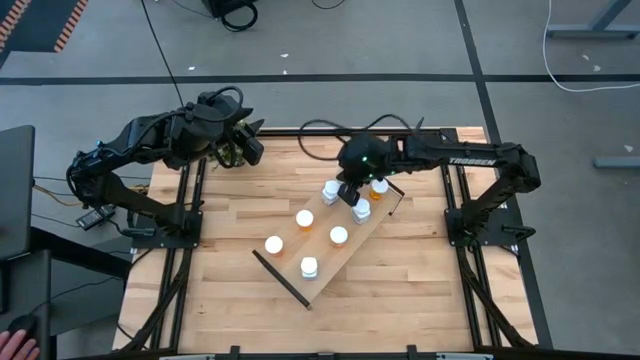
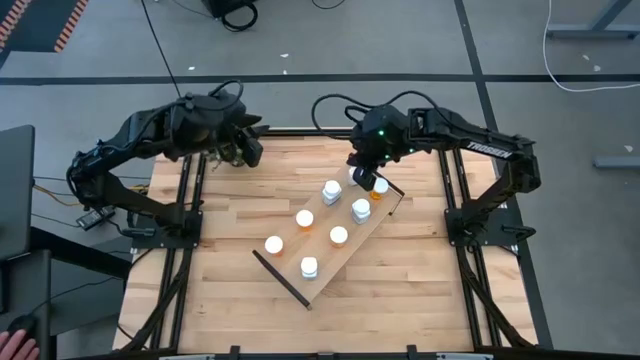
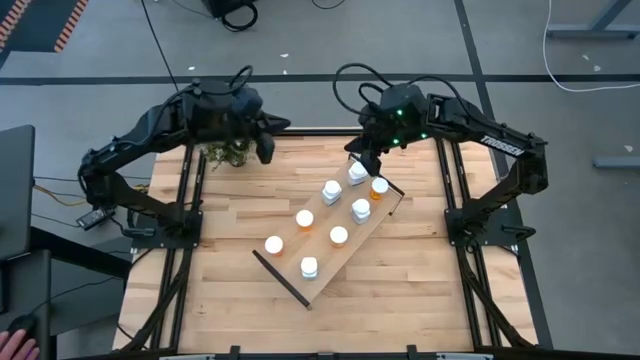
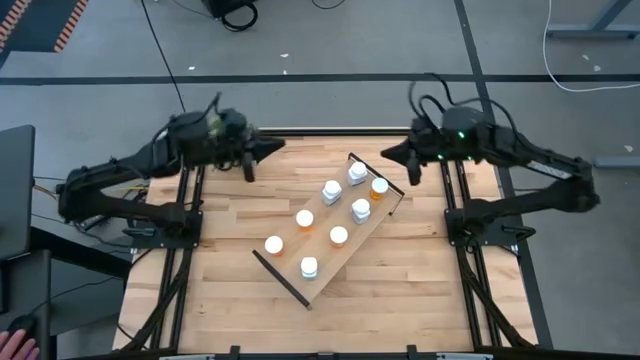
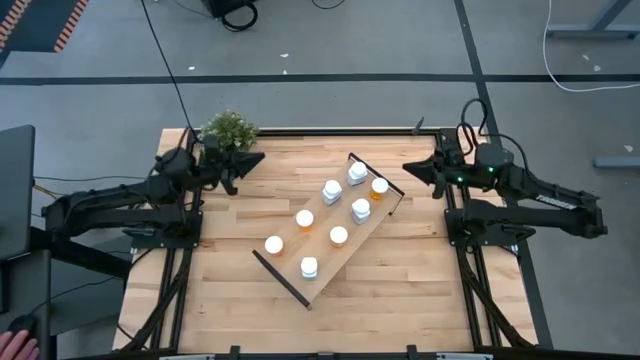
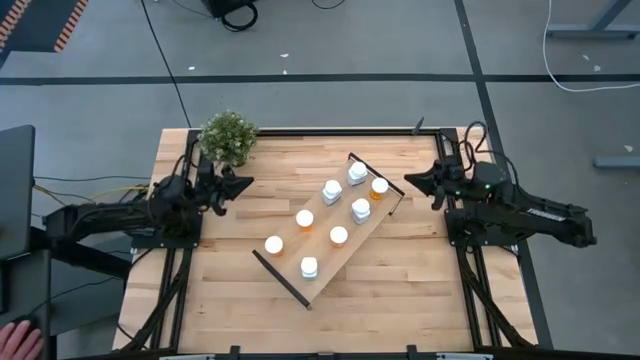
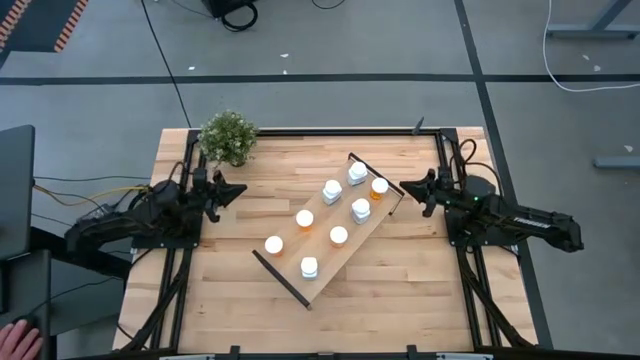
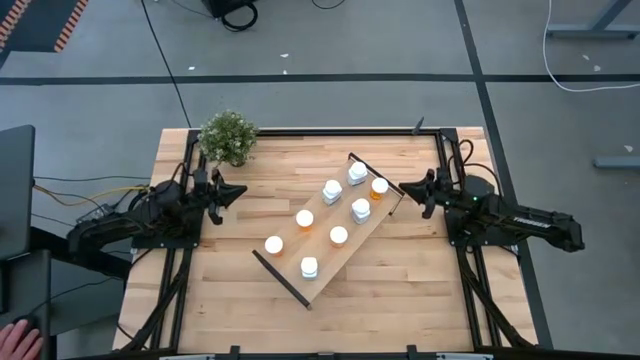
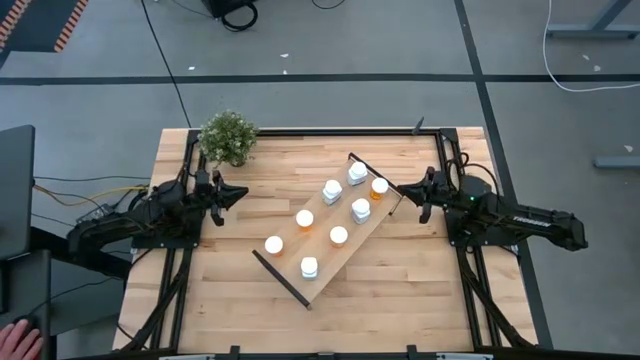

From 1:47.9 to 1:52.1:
Task: Pick and place medicine bottles onto shelf by color
Return to Home Position

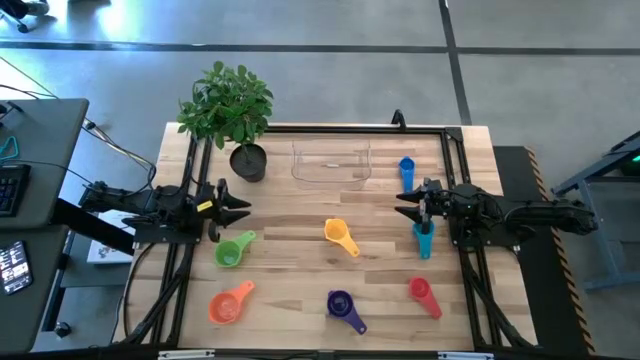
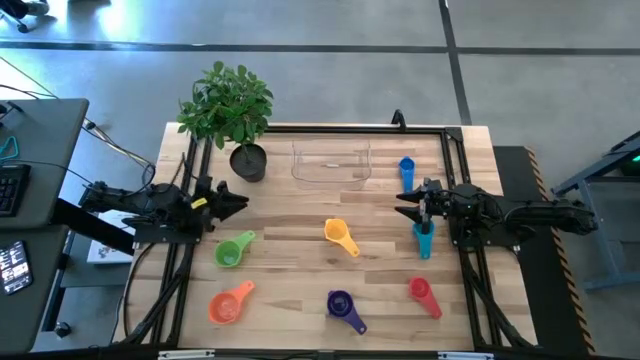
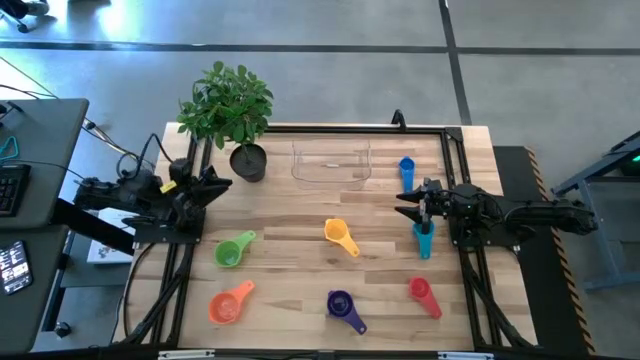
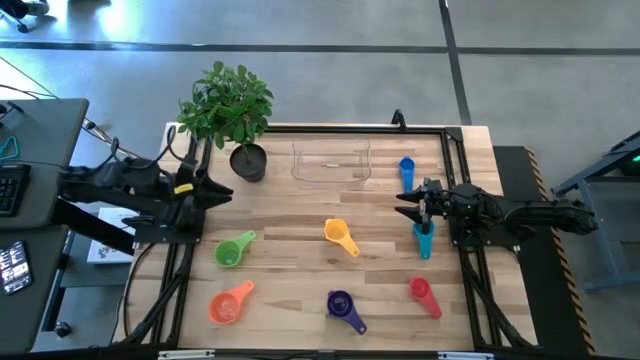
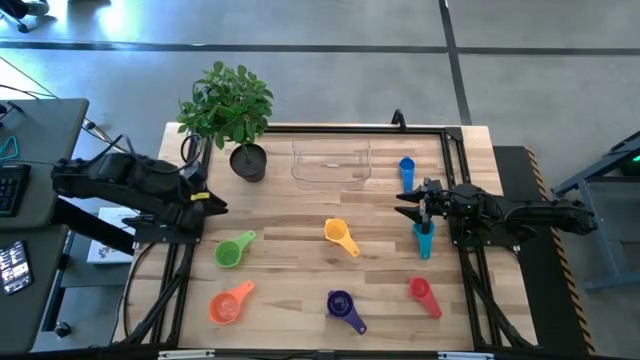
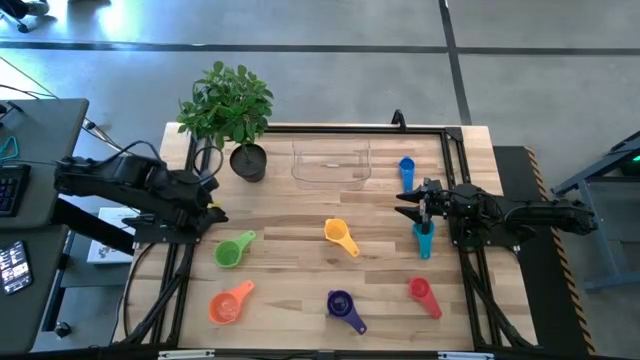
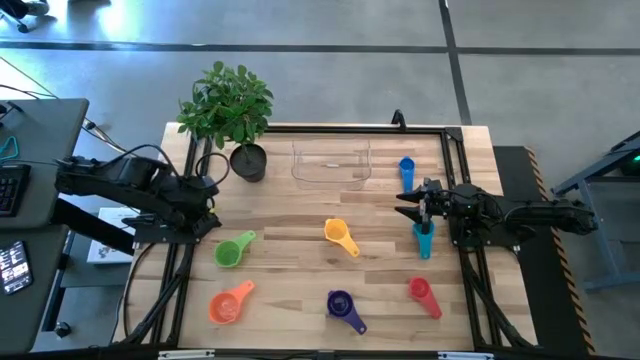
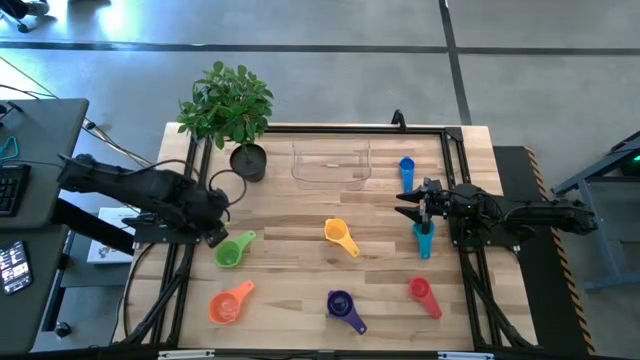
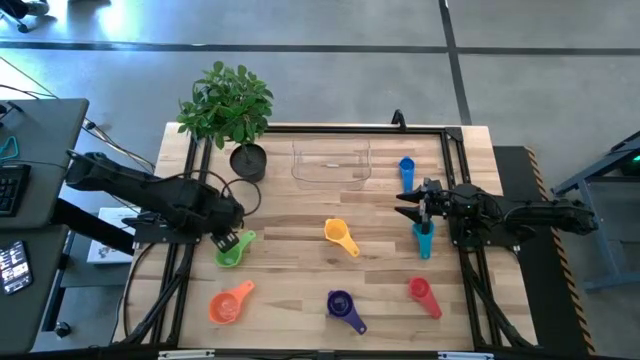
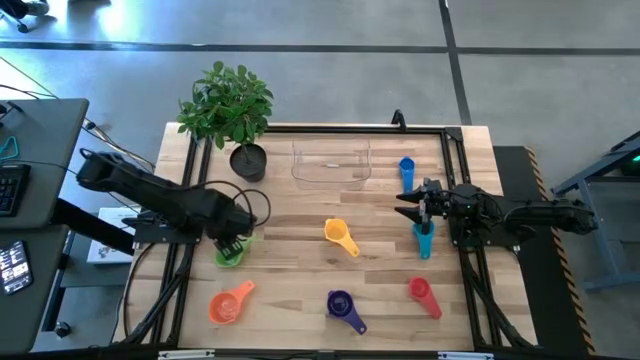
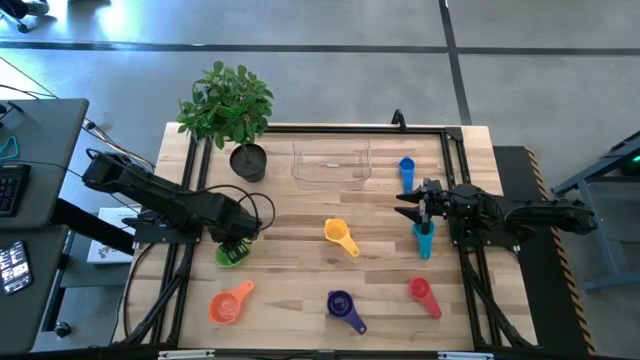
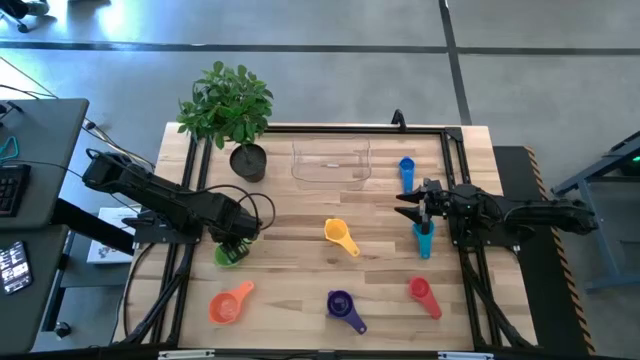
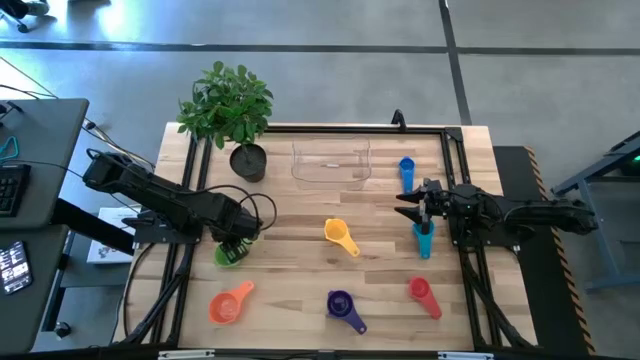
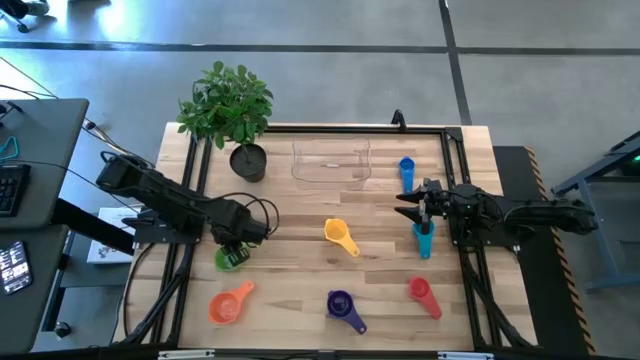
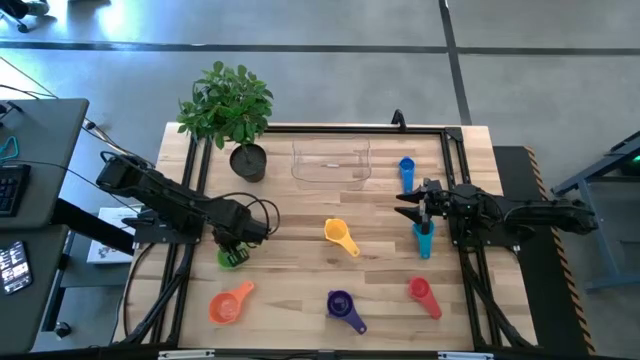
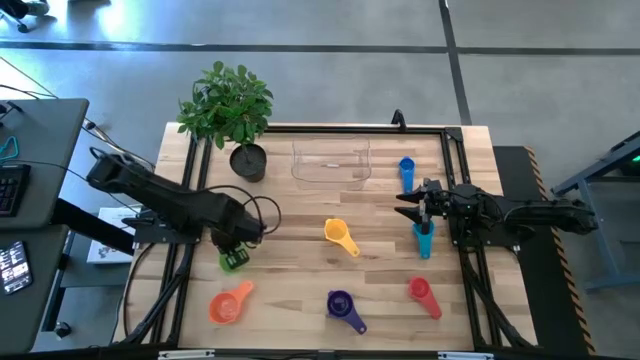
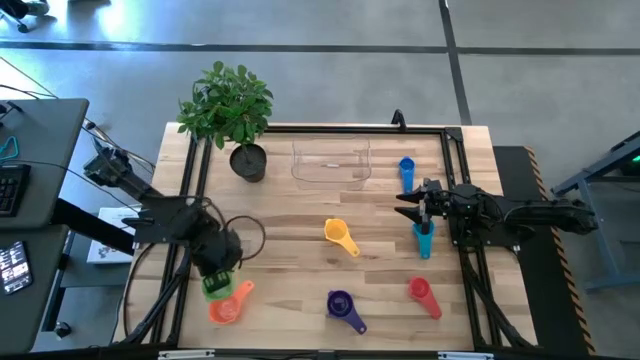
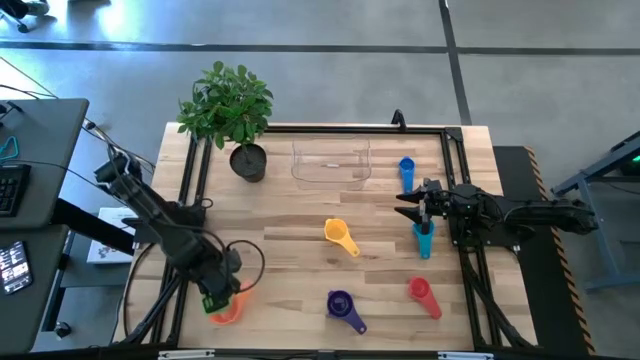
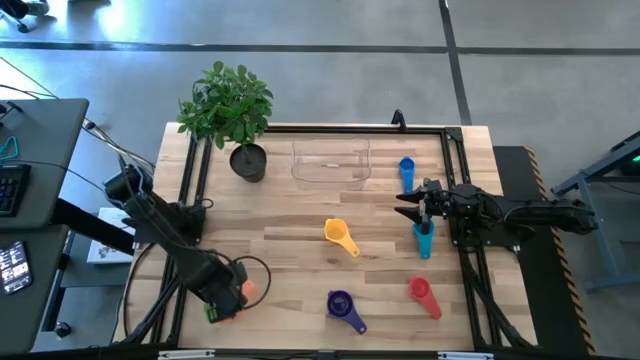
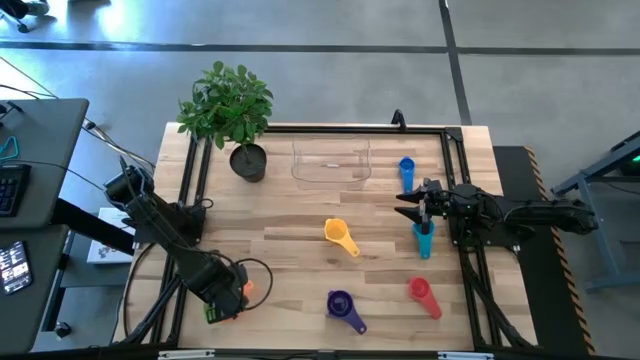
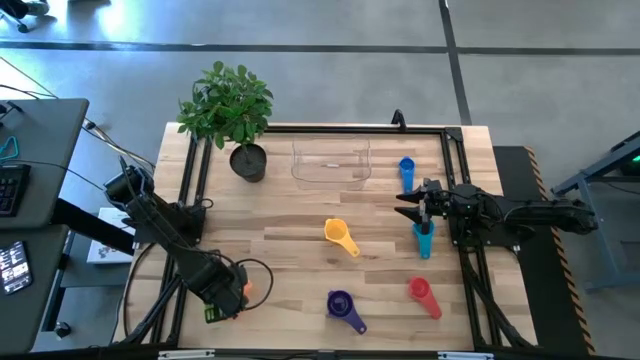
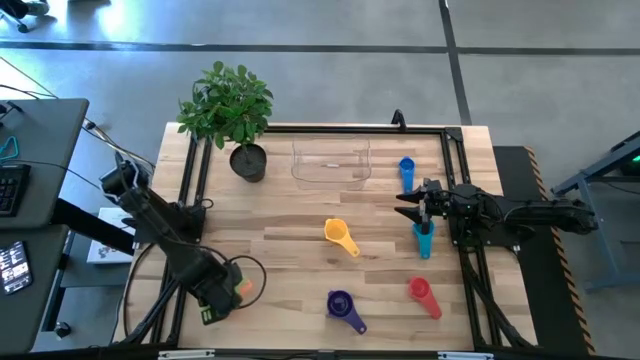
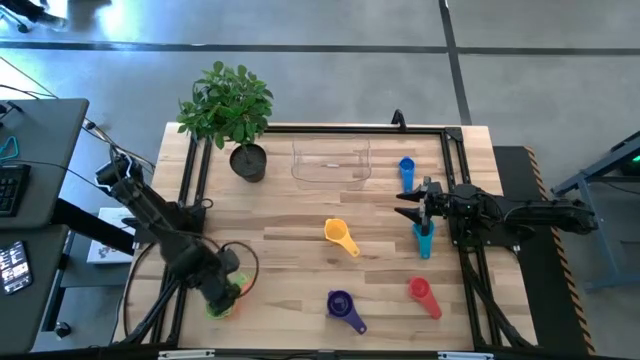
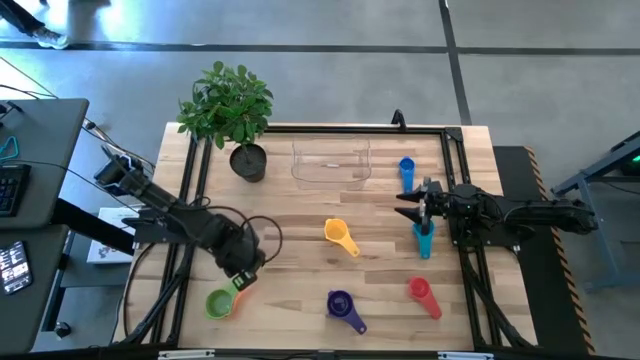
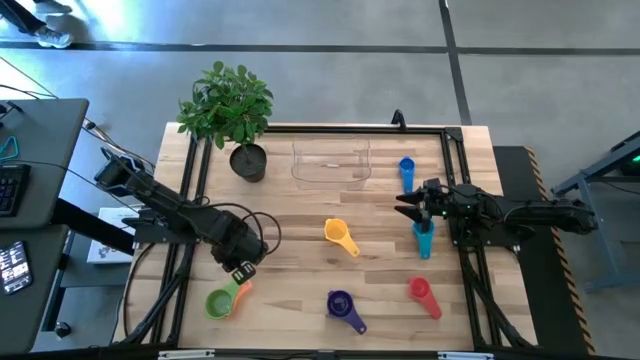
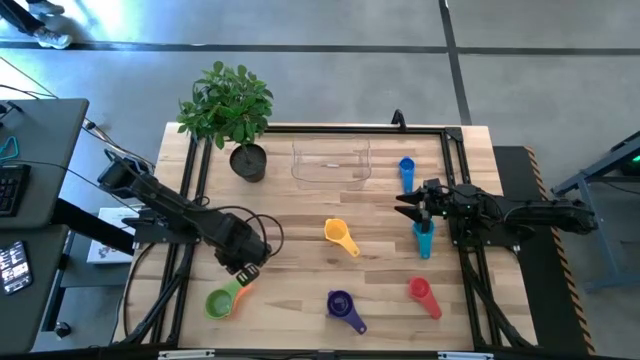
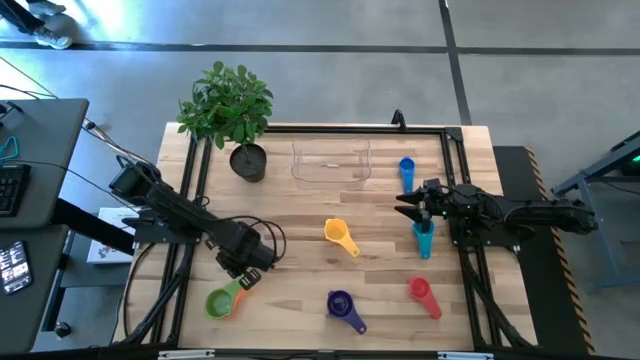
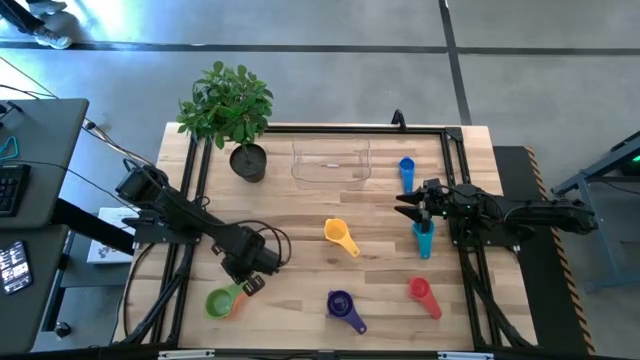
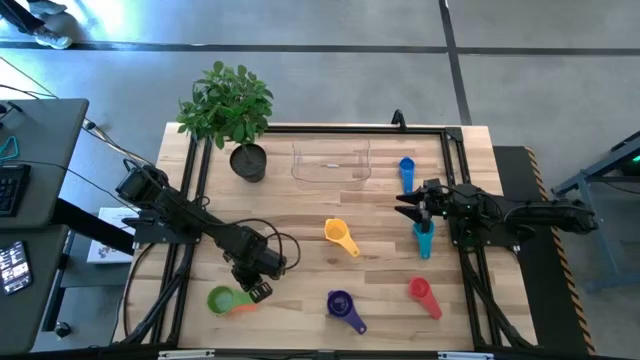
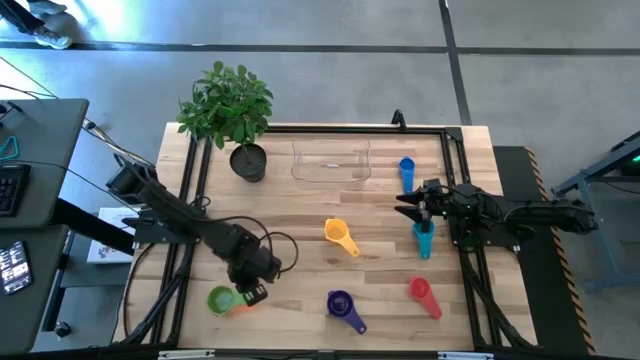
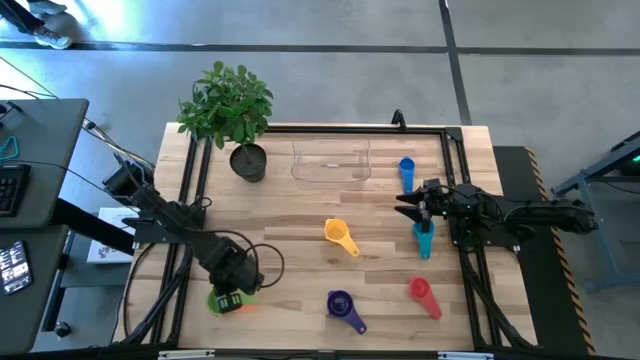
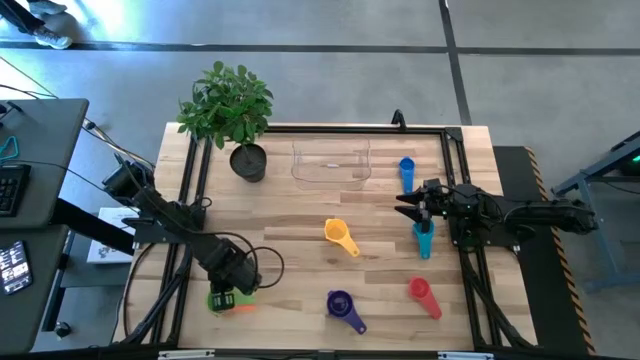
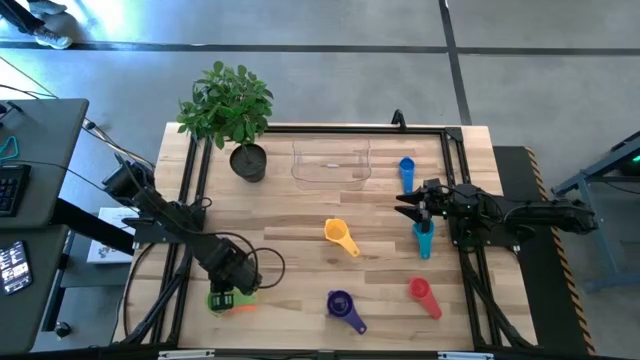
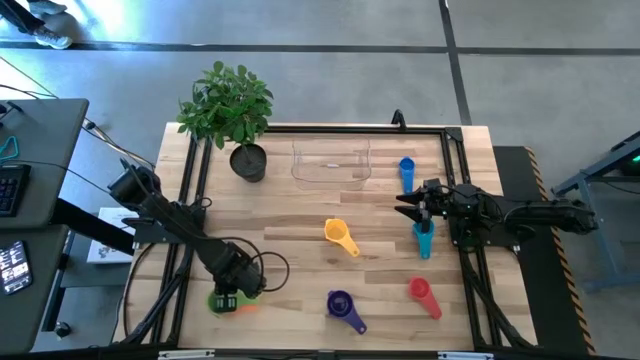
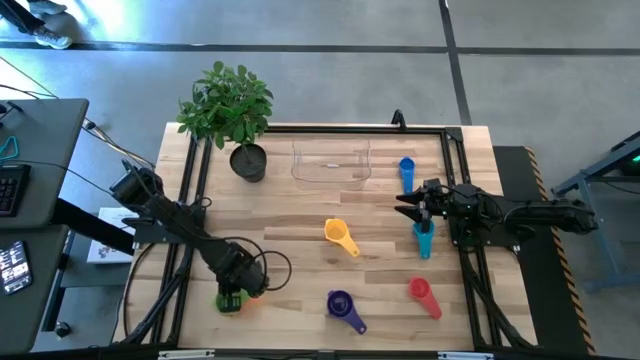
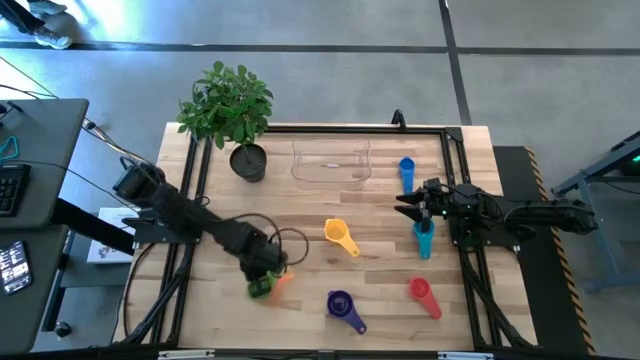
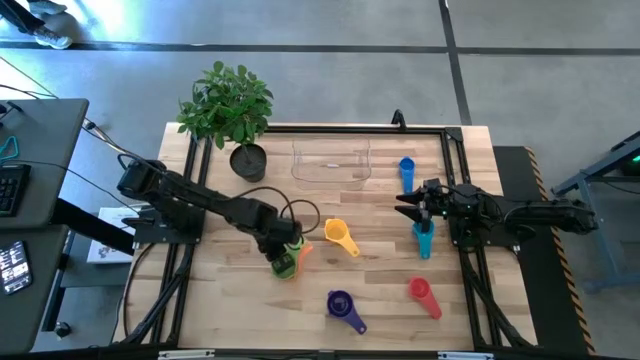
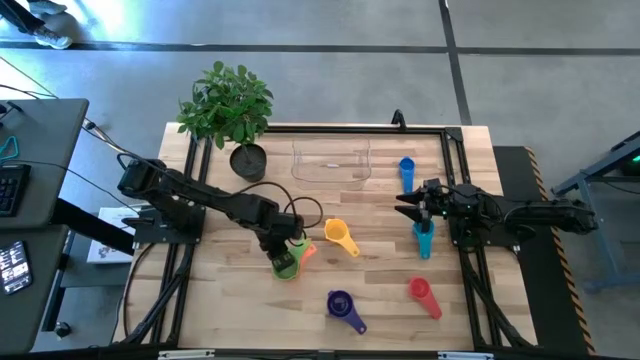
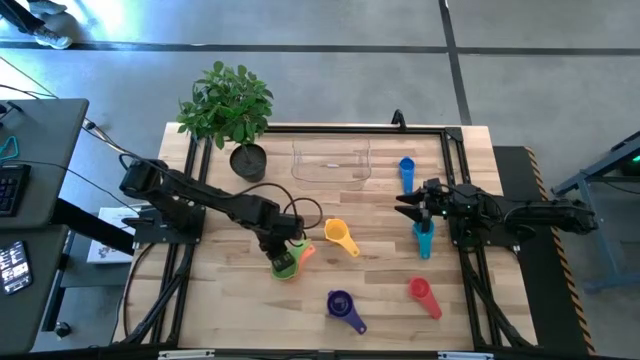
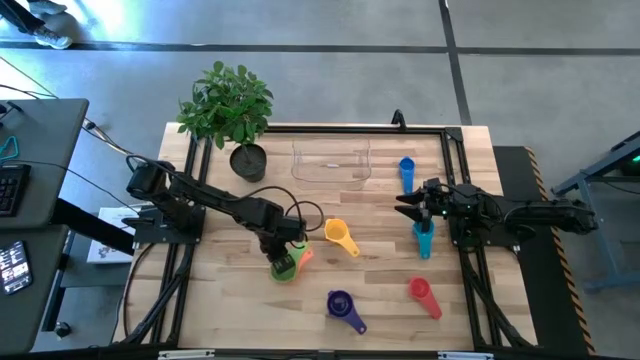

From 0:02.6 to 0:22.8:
Task: Nest measuring cups in basket
Stack the green measuring cup on top of the orange measuring cup
